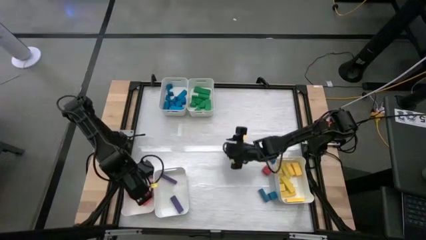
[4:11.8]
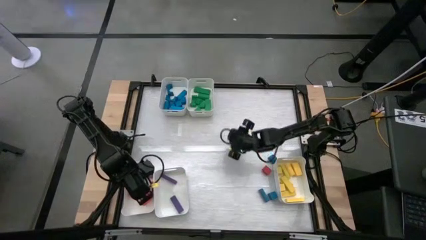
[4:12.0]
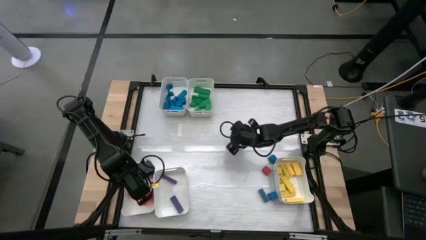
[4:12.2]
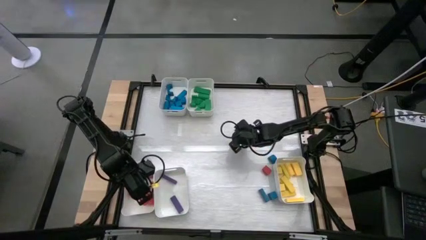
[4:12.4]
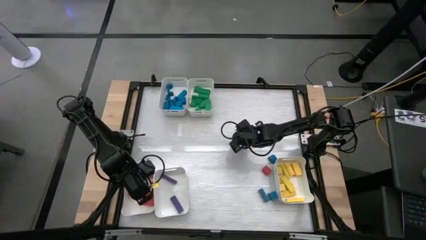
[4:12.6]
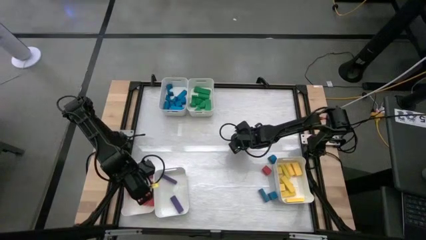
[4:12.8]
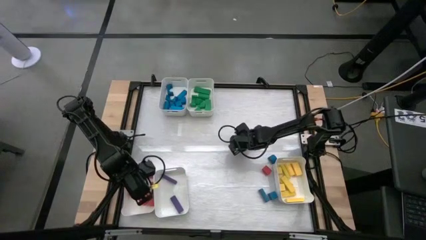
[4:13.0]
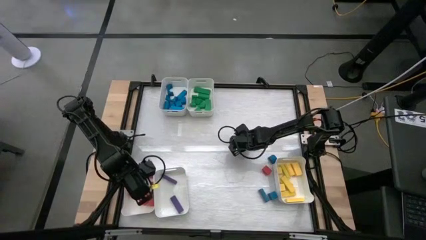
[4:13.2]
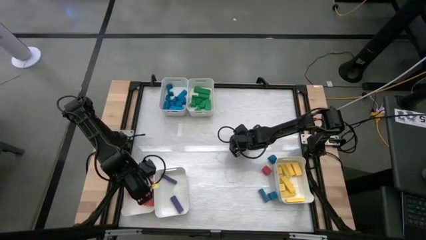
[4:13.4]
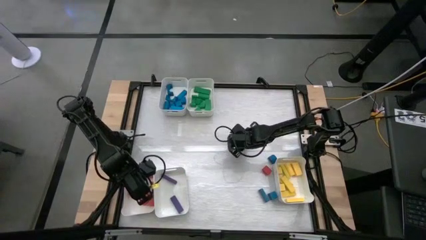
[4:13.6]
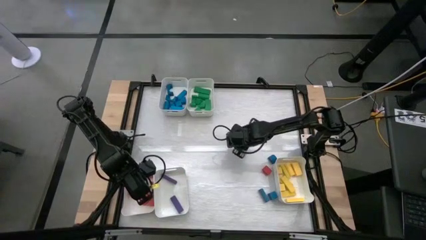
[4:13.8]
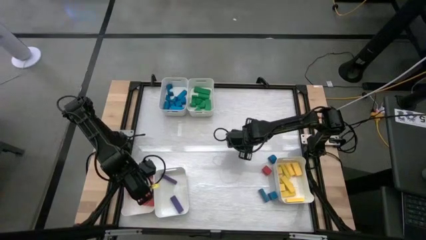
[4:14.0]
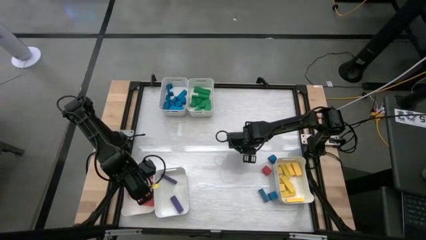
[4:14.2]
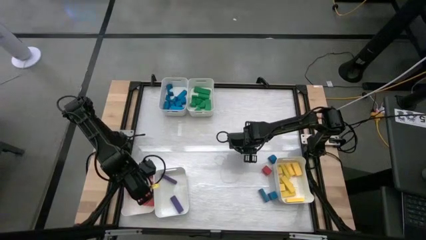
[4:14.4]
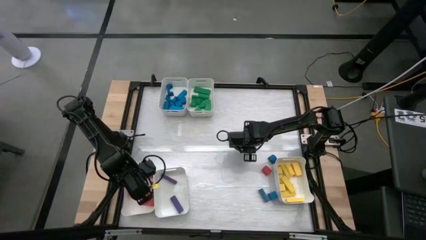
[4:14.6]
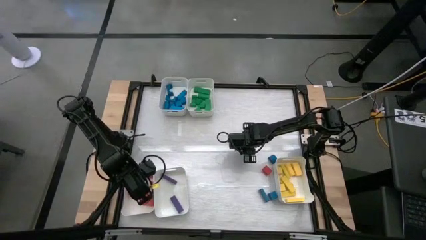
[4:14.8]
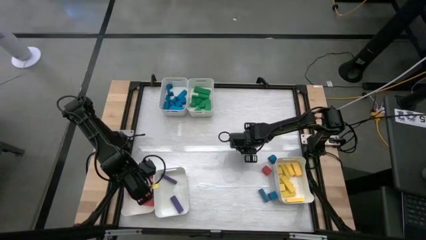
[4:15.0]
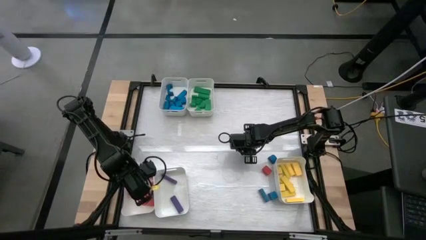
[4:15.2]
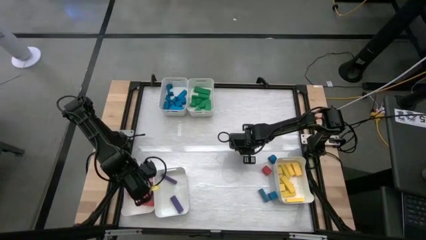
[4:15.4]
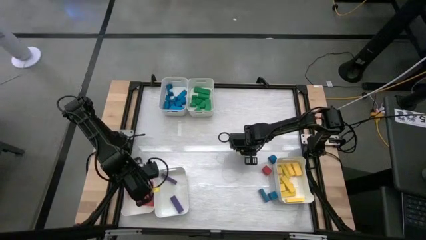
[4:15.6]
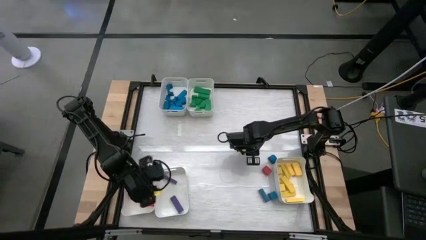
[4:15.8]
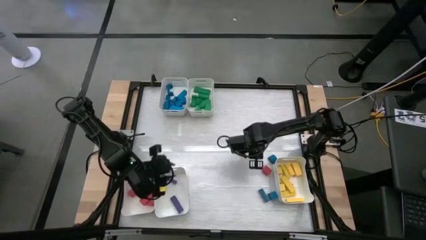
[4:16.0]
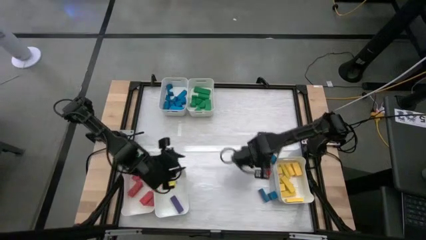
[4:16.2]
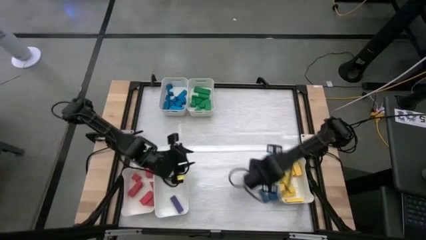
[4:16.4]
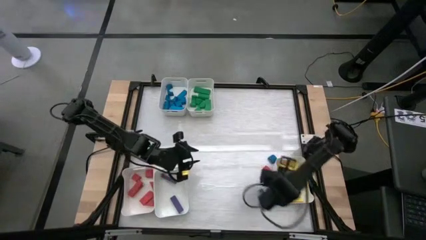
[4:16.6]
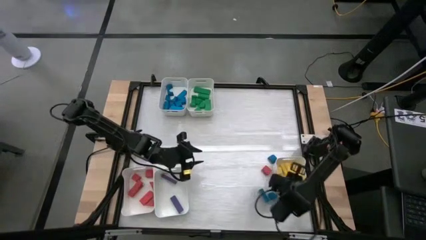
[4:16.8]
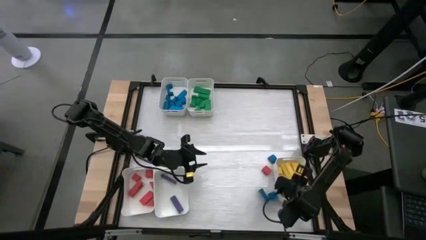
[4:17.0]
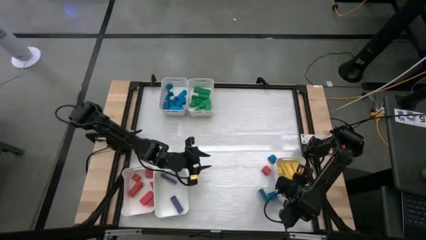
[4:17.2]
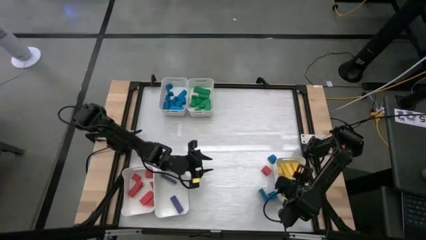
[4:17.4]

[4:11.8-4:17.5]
Task: Sort blocks
Put the yellow block into the bottom right white bin

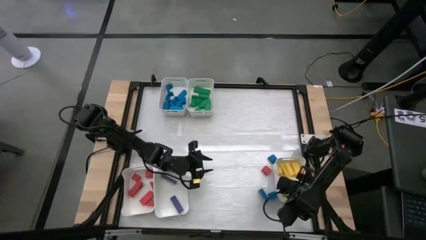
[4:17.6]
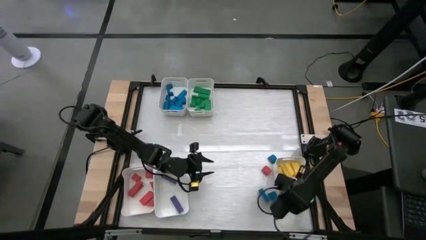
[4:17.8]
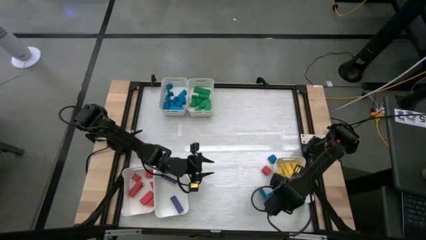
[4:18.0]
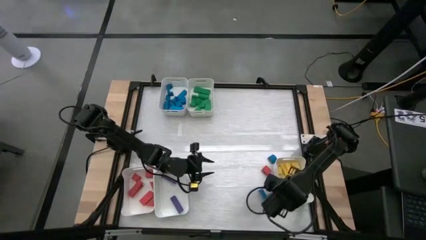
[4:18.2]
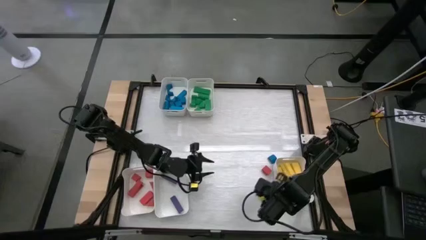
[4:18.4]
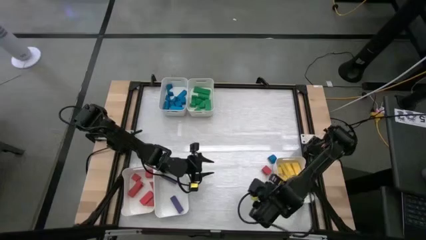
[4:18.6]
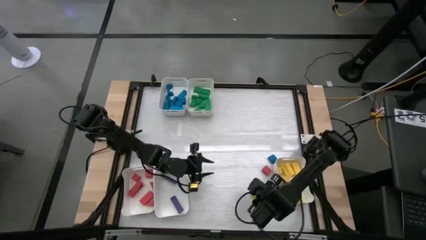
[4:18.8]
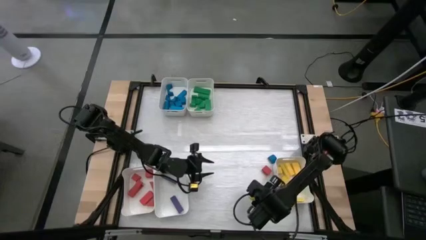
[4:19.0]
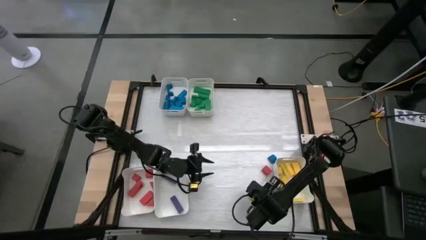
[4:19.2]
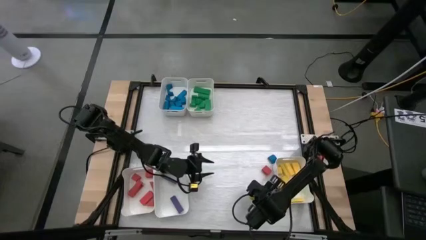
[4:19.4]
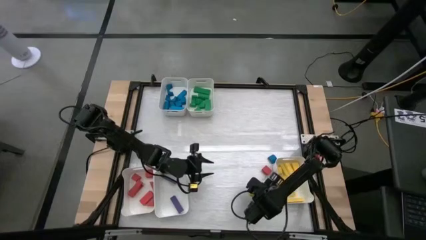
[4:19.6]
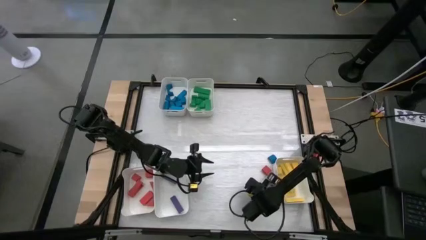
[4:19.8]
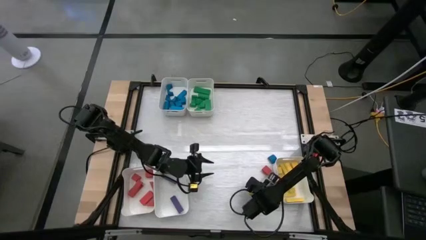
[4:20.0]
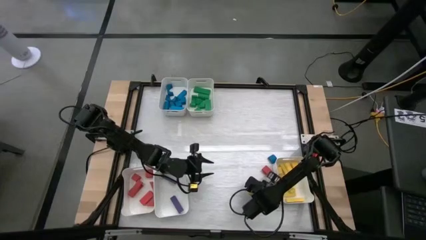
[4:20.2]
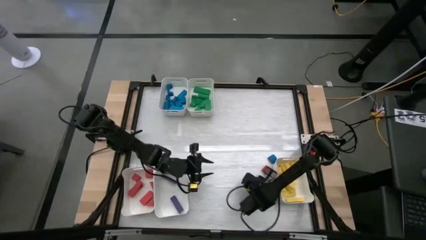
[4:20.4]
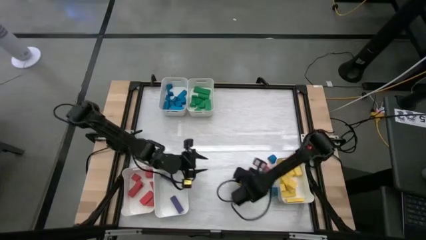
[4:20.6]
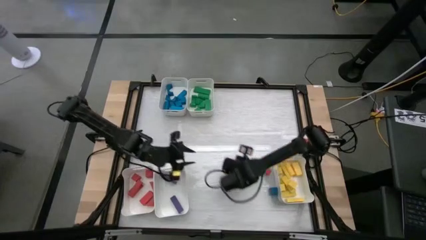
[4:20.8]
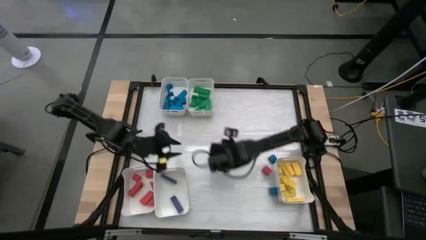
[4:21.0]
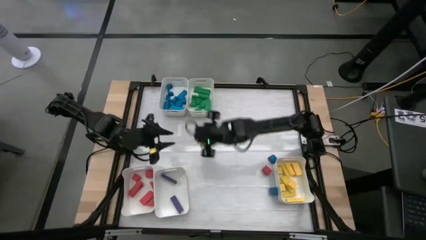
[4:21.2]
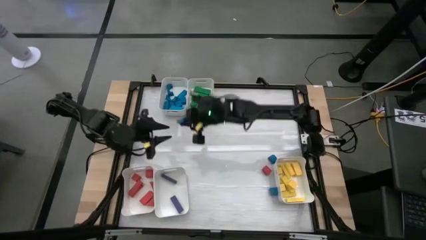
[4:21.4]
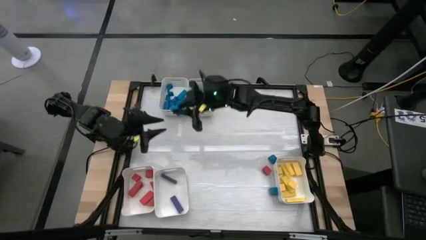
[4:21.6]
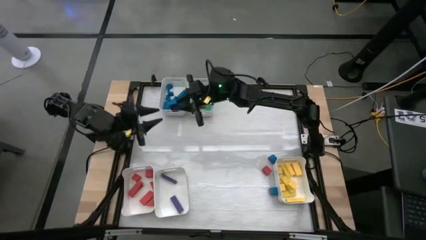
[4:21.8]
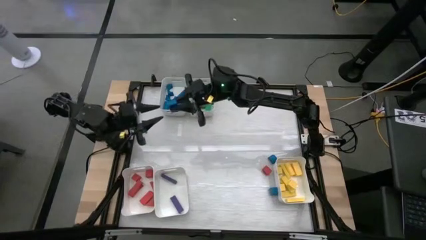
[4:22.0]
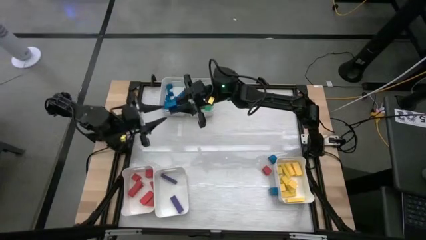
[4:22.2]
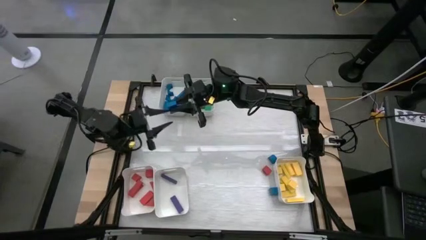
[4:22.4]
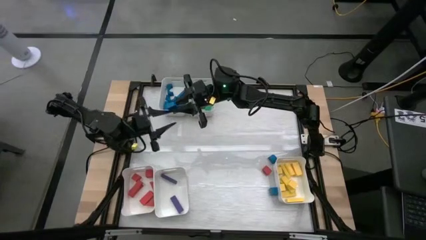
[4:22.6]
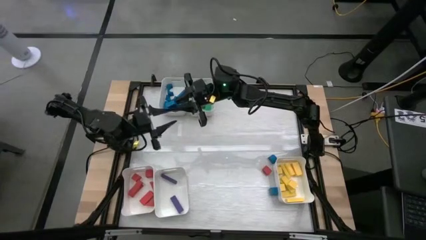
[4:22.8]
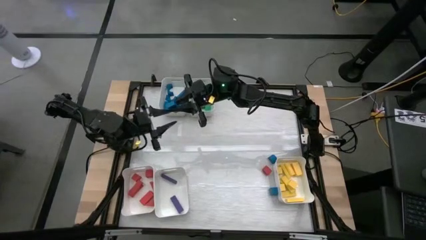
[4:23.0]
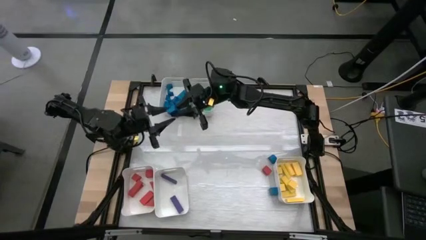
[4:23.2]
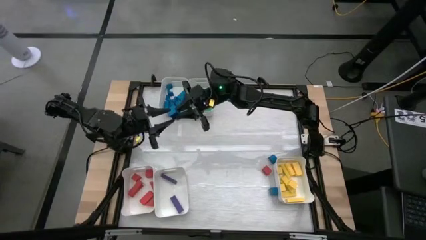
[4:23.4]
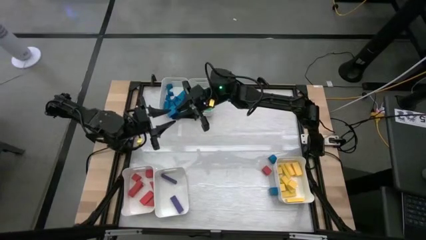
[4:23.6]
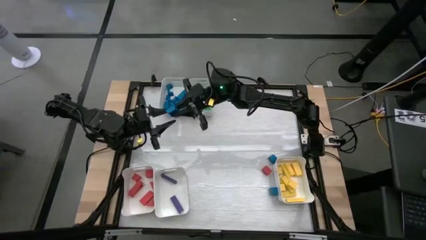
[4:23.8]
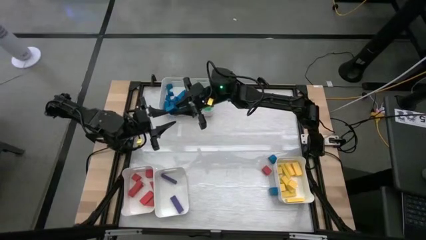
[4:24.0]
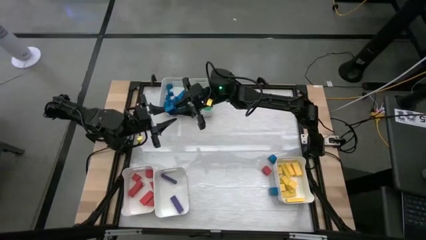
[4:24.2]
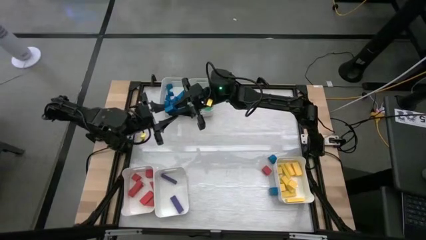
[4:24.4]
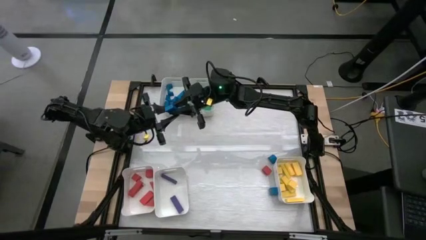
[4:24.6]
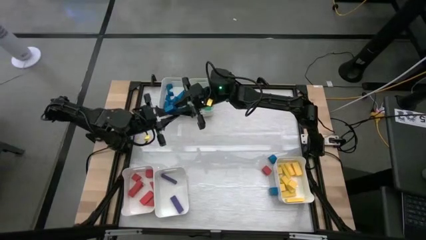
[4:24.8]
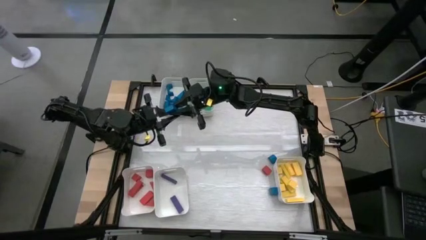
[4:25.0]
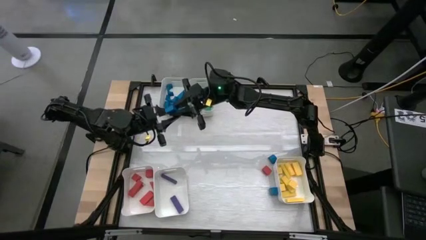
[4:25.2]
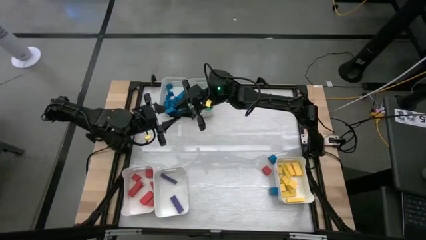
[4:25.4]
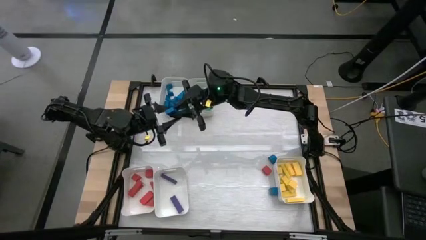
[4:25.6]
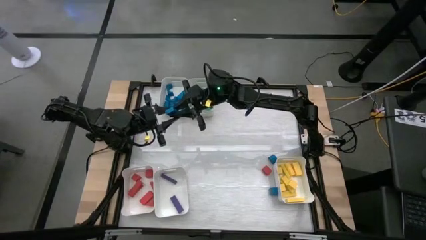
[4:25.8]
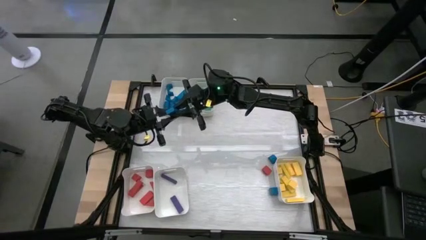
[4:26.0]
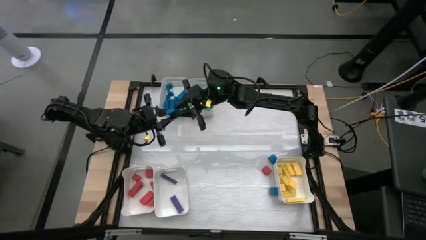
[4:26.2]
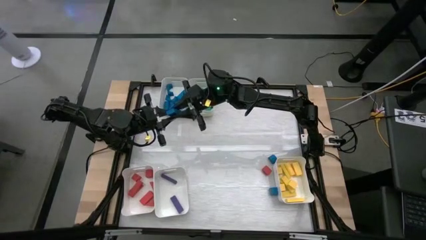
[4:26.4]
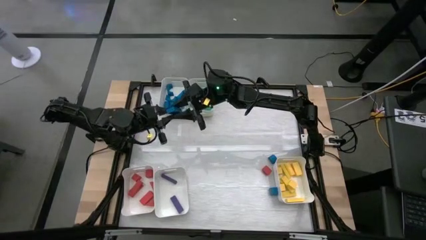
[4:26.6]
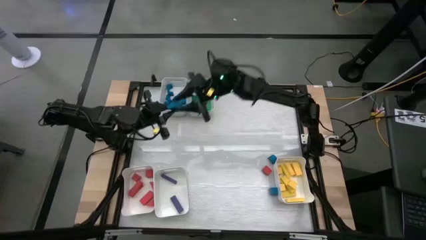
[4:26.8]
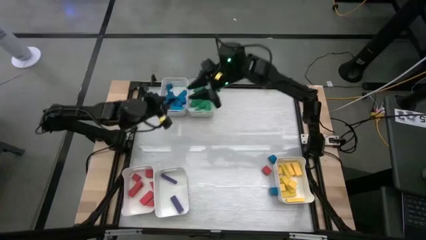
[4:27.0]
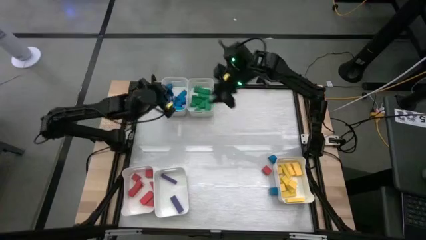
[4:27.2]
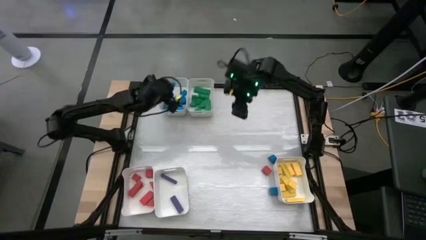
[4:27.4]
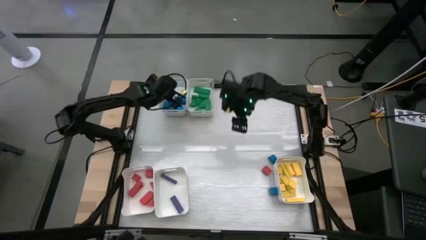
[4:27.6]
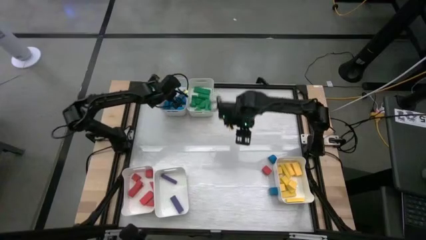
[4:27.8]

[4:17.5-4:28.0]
Put the blue block into the top left white bin
